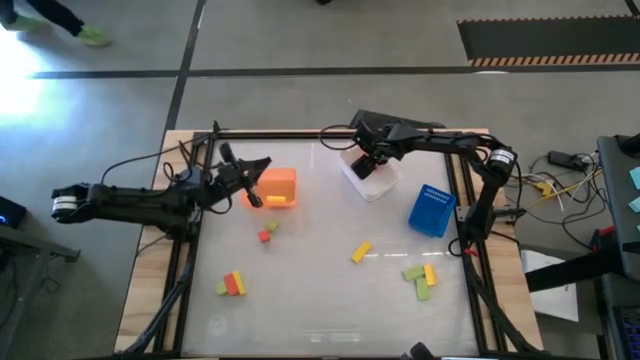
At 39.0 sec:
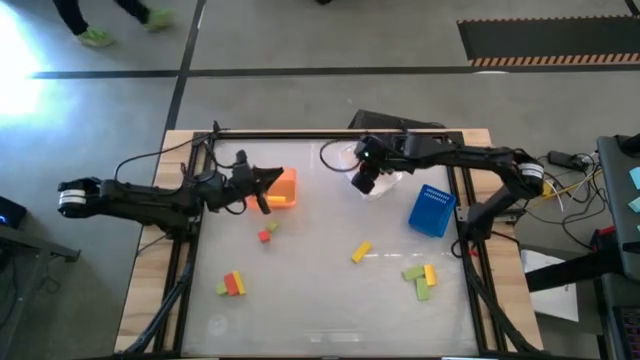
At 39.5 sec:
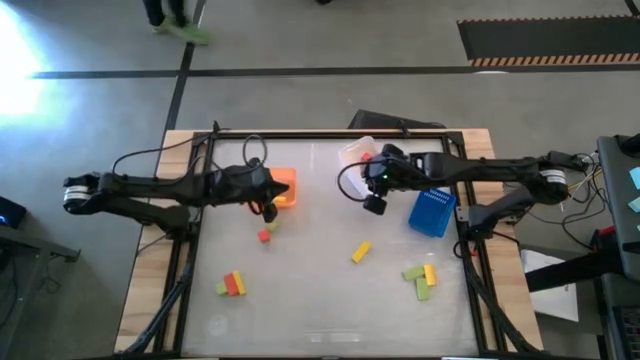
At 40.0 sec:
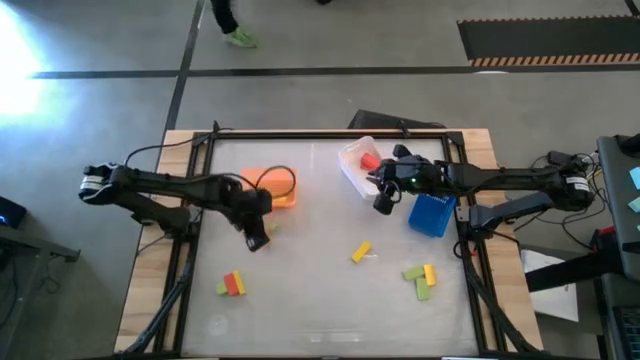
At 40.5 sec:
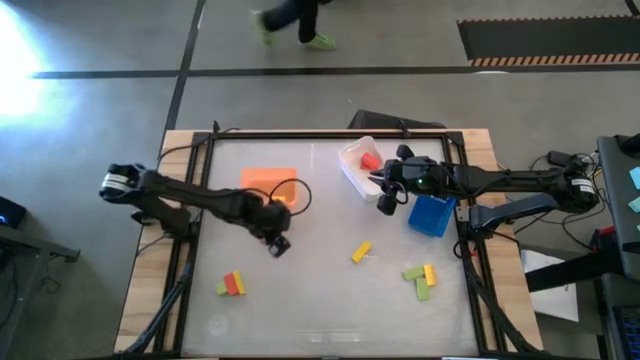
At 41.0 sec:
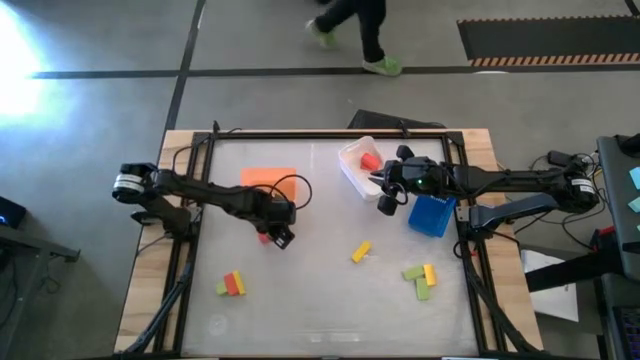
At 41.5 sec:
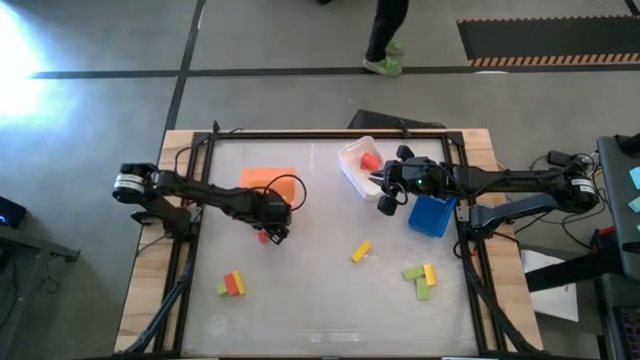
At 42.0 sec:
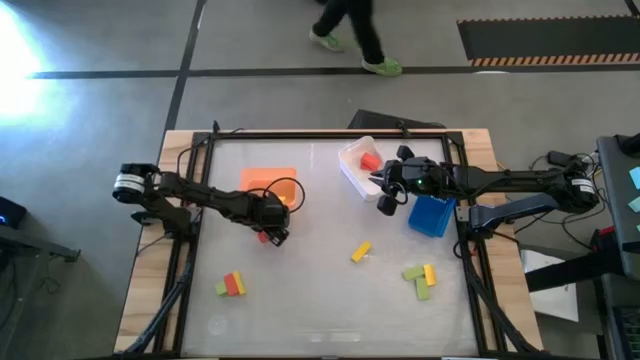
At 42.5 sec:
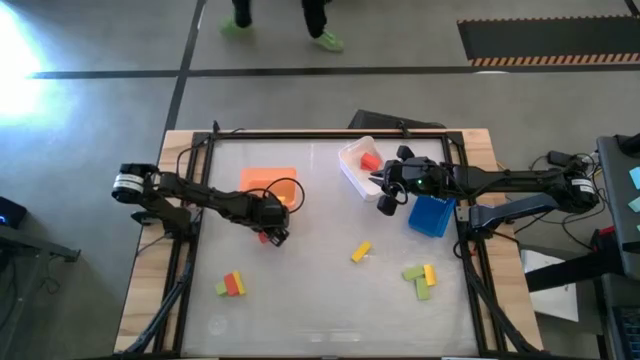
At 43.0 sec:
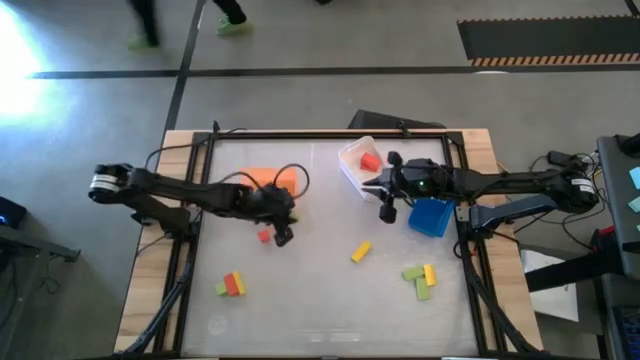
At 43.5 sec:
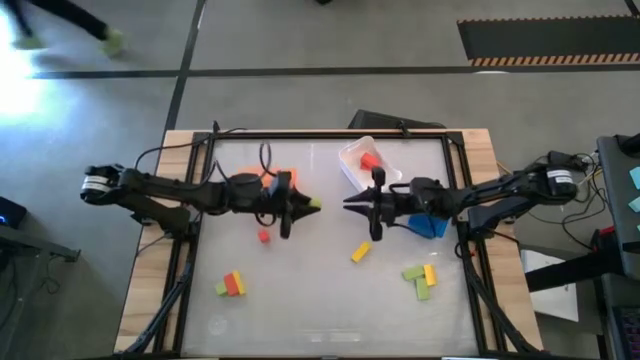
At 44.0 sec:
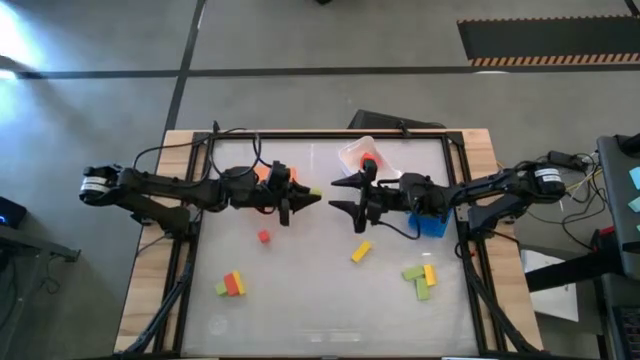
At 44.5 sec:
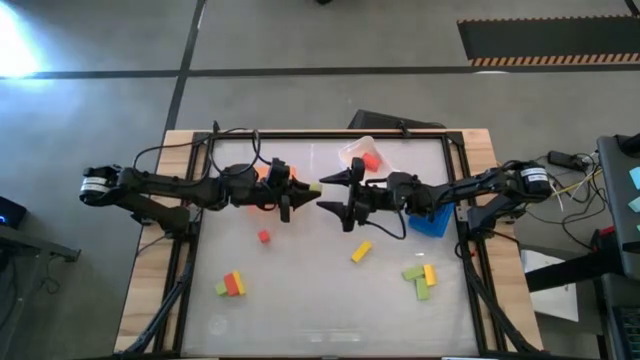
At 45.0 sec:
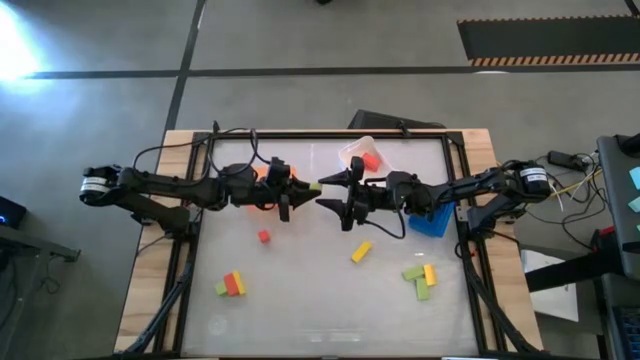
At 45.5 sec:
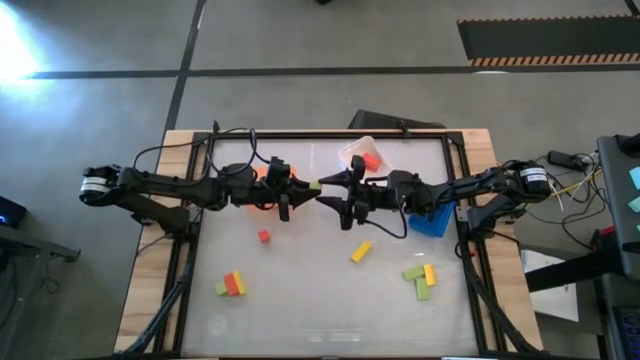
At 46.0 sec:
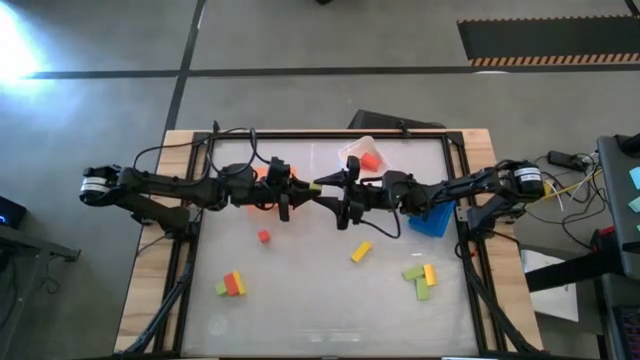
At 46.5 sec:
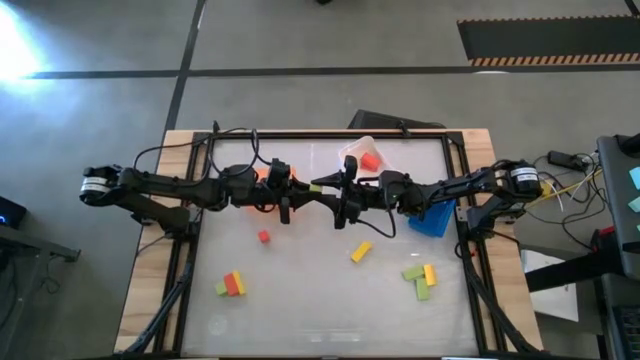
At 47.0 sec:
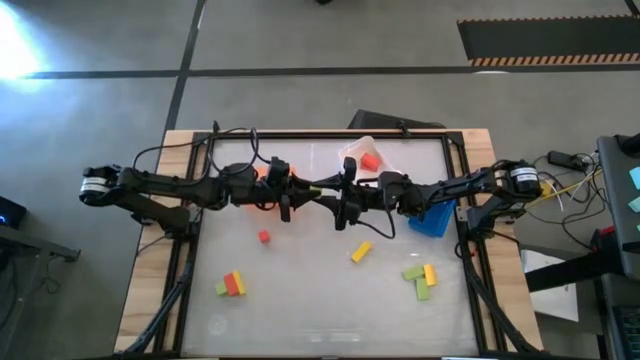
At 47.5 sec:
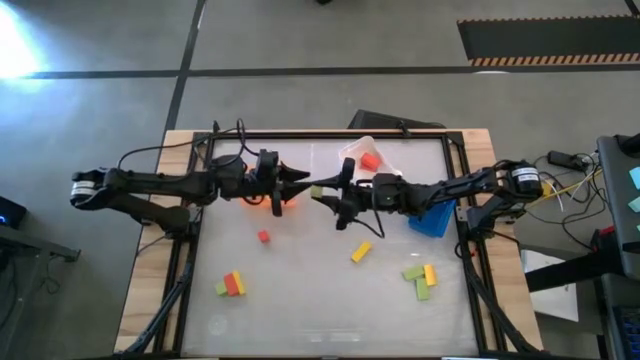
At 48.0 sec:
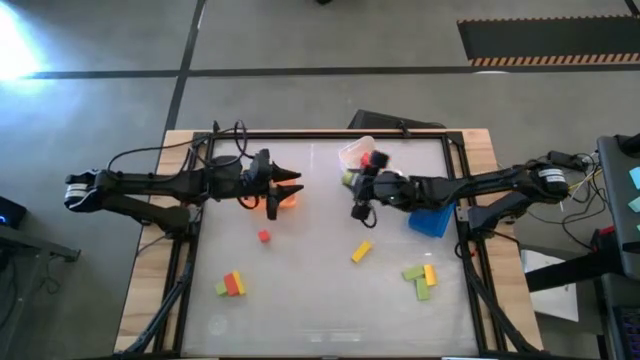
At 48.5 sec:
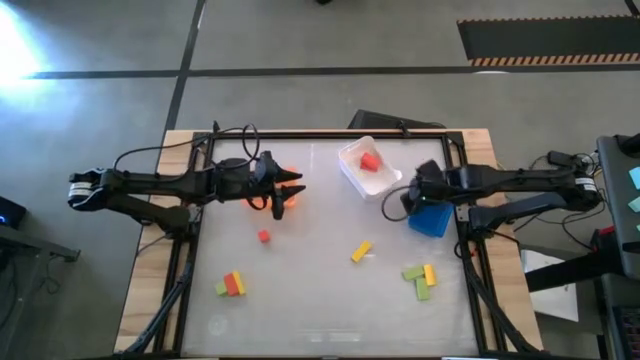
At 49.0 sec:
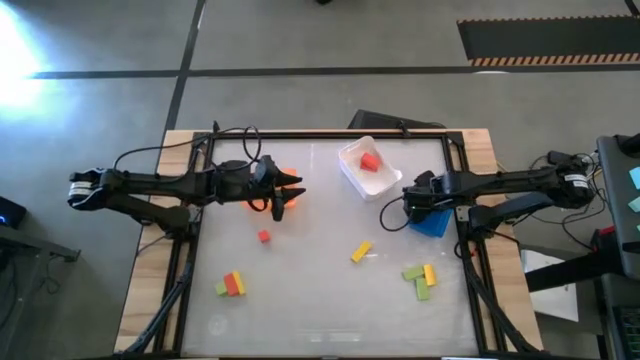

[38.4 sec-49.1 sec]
Task: Sort & place blocks by color
Put the green block into the blue bin

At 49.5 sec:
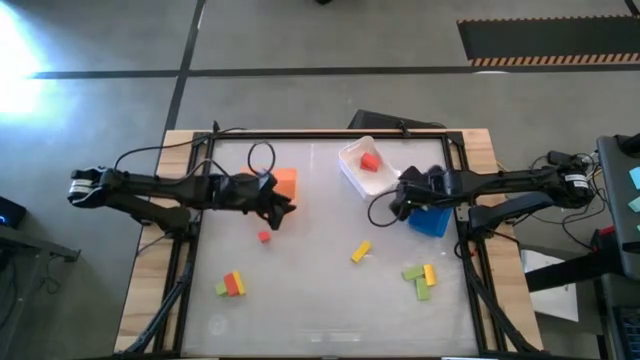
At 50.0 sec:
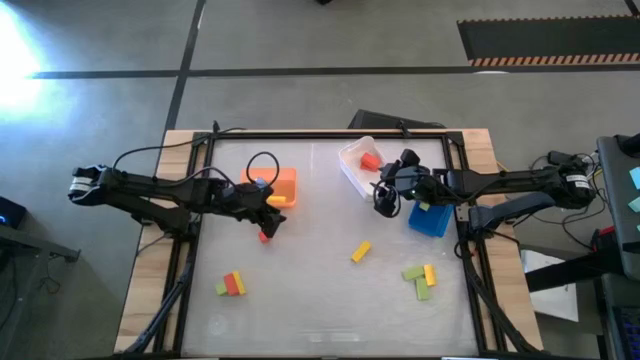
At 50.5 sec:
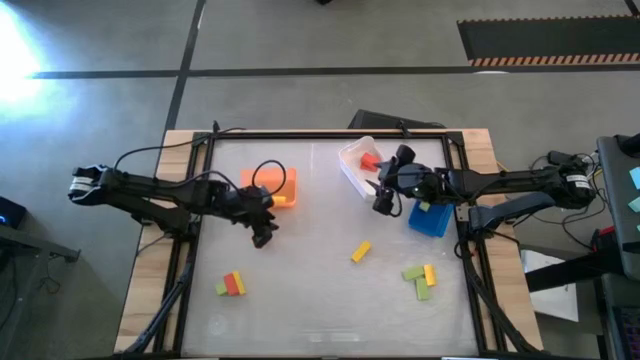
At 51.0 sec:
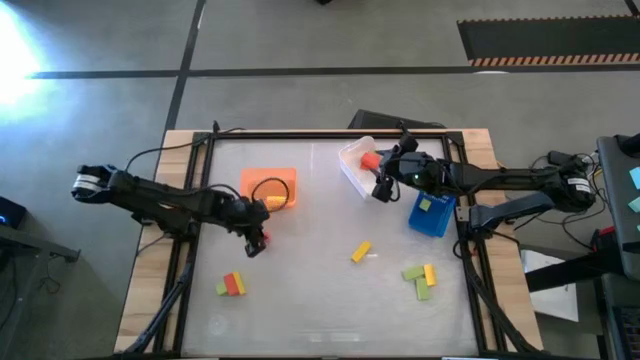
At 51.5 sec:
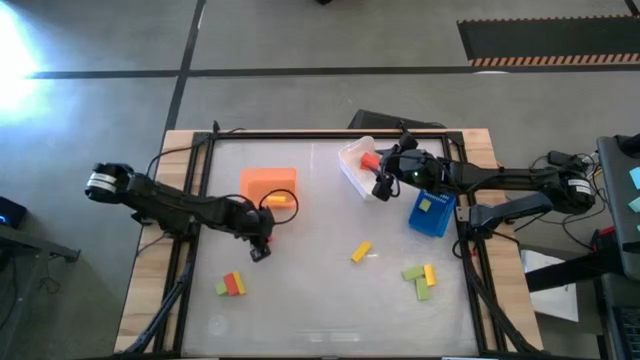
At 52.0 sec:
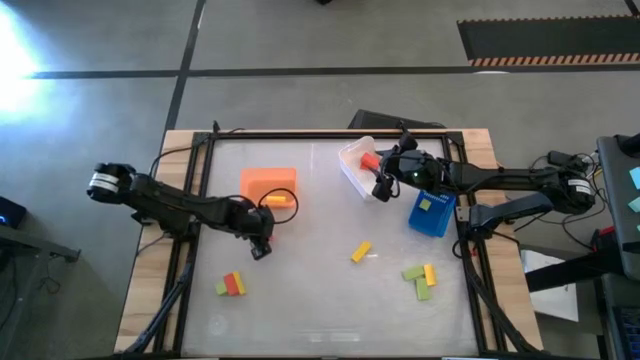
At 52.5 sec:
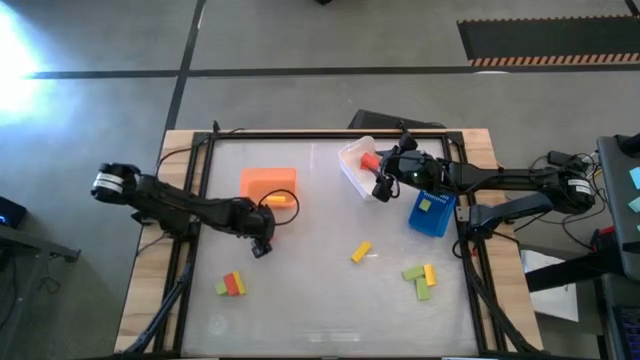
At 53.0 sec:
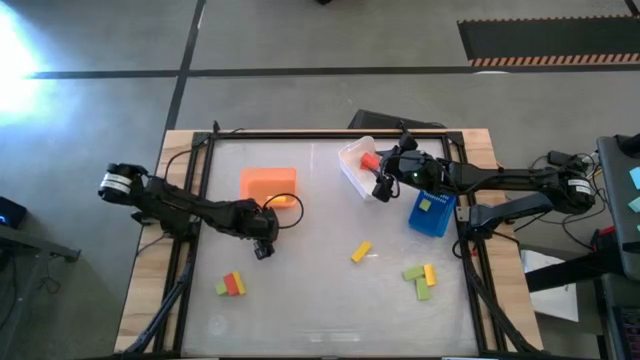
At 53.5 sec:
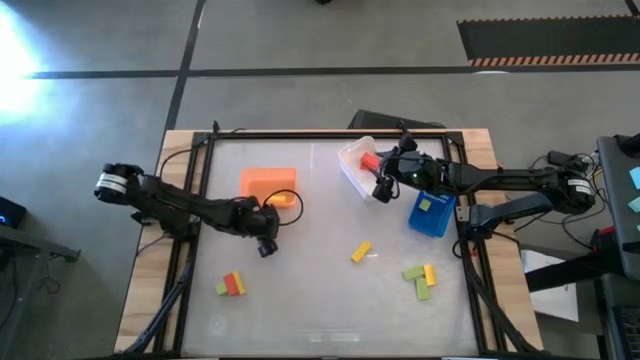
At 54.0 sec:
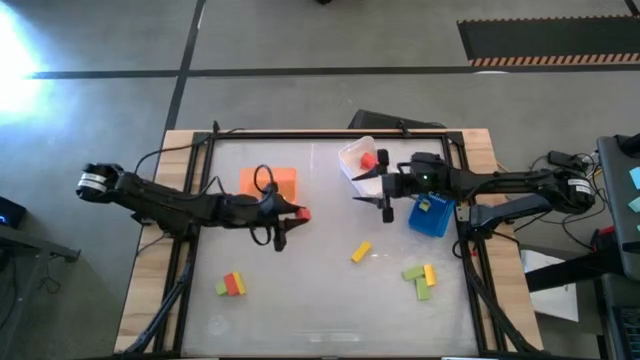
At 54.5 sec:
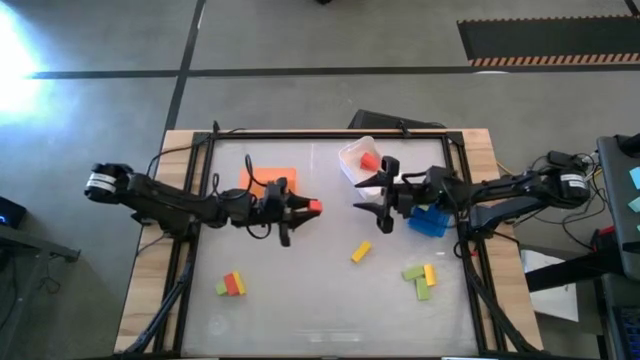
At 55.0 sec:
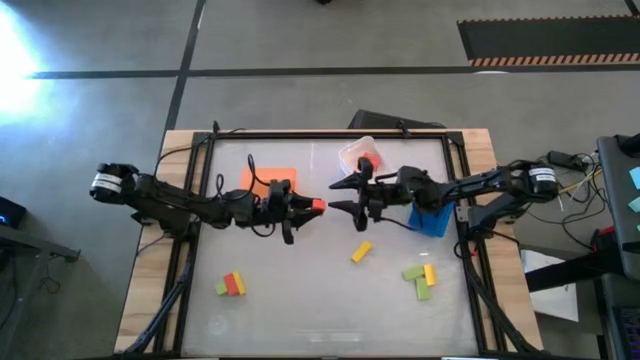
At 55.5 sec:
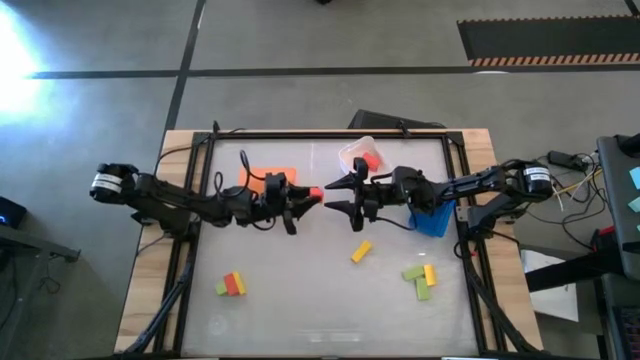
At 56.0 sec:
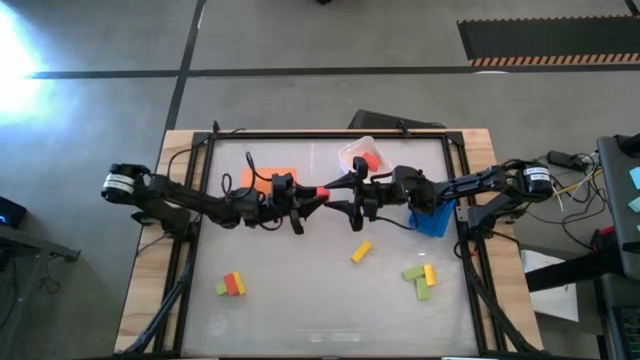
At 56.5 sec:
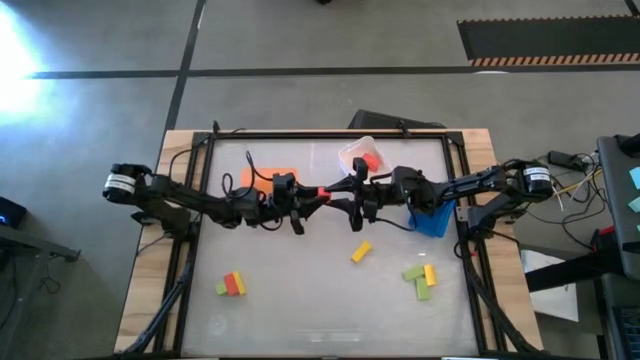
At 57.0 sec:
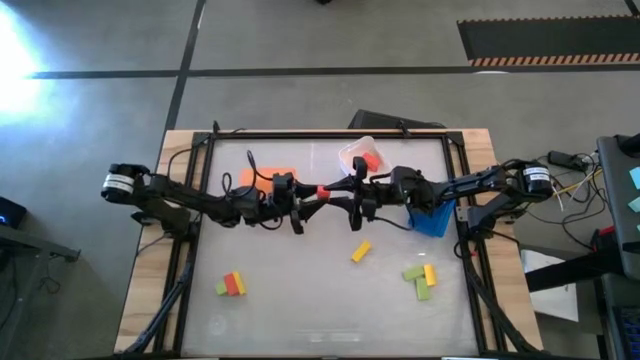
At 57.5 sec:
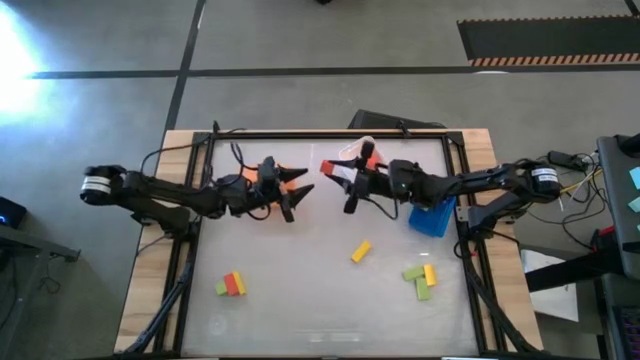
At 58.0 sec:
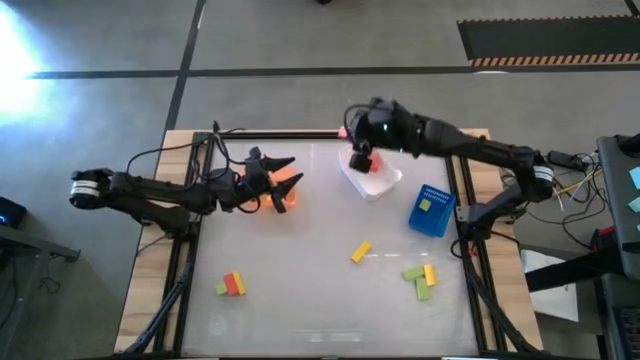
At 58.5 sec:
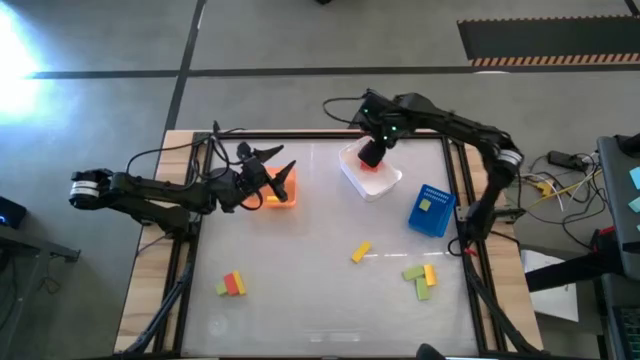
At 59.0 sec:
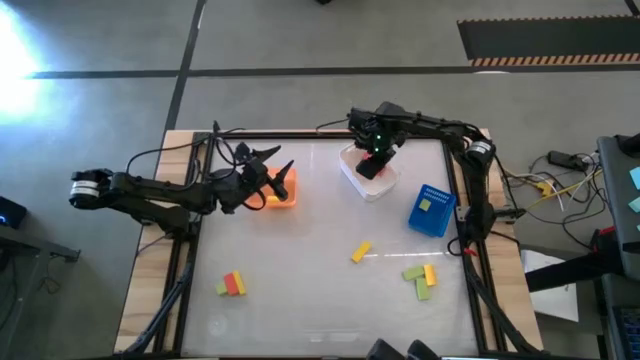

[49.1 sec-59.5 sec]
Put the orange block into the white bin
